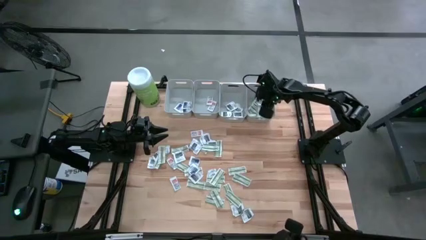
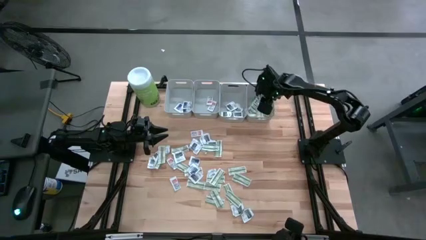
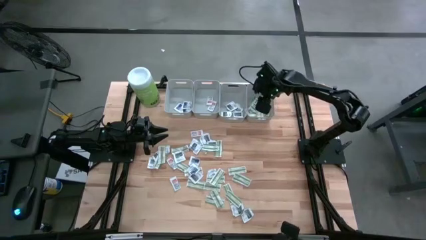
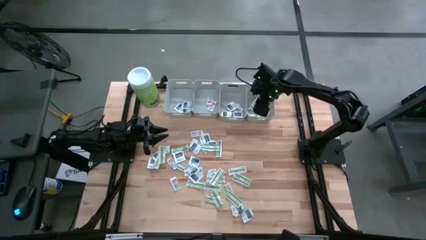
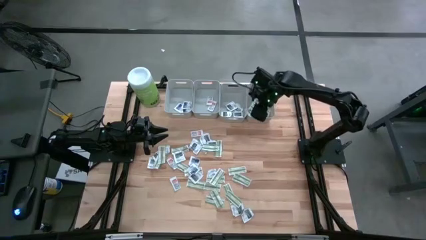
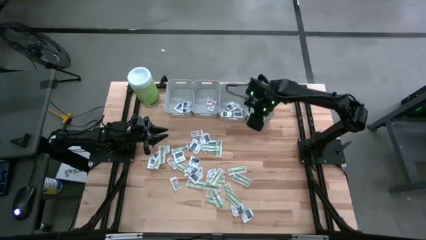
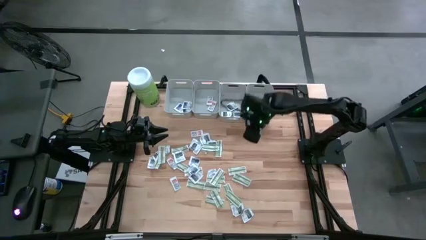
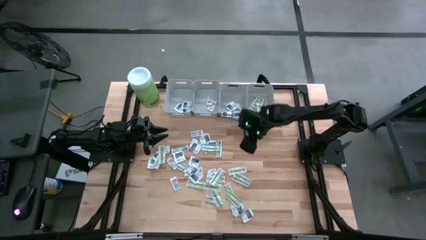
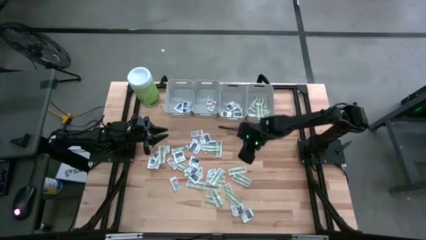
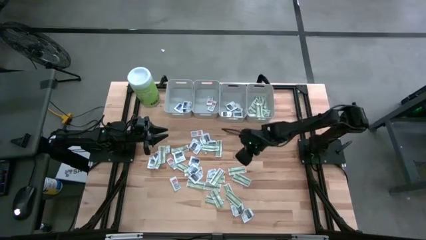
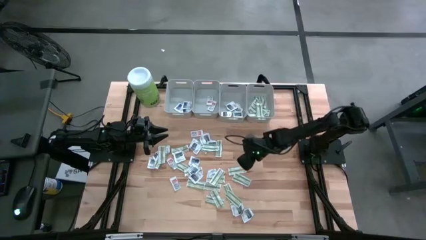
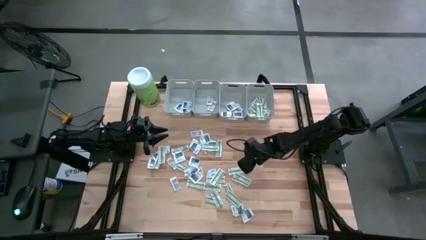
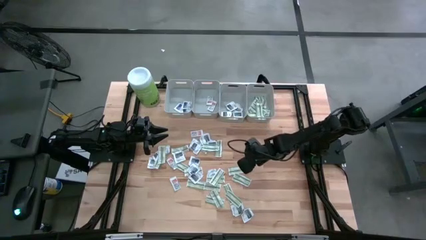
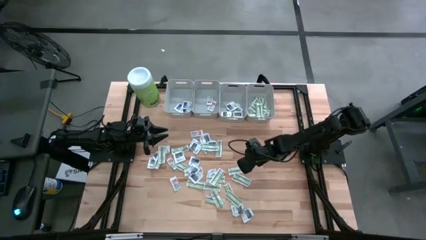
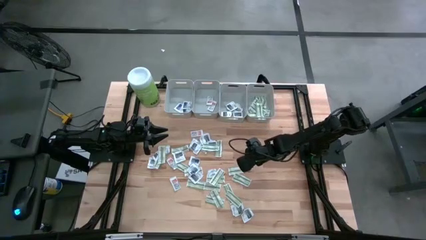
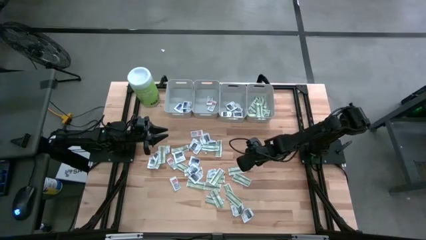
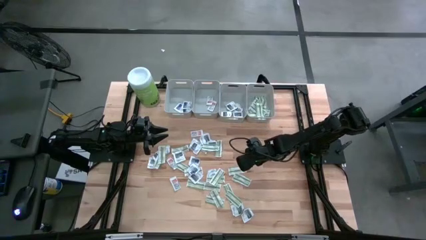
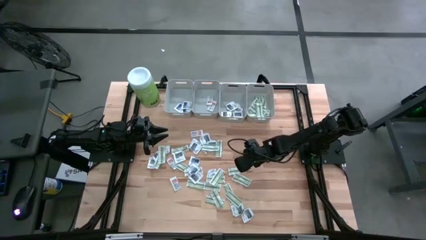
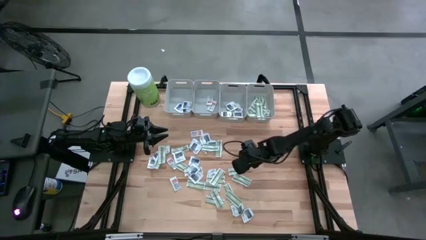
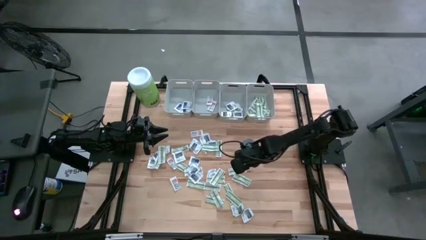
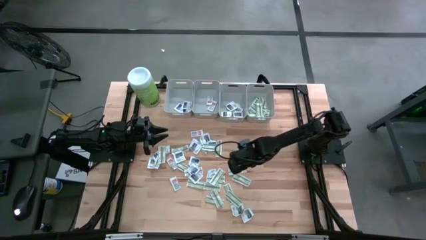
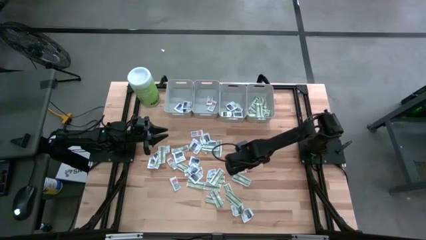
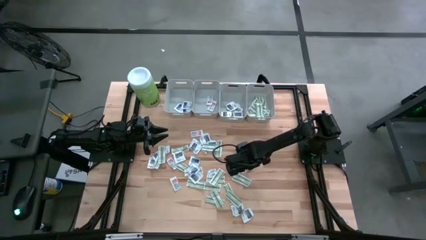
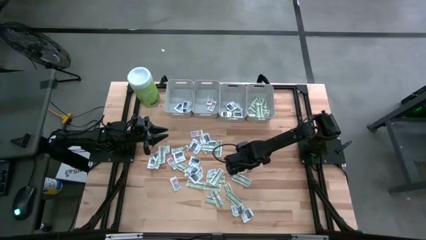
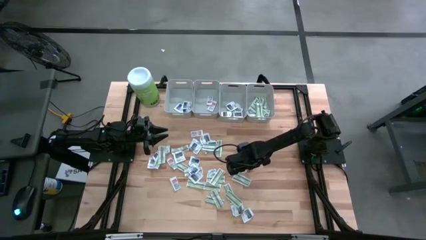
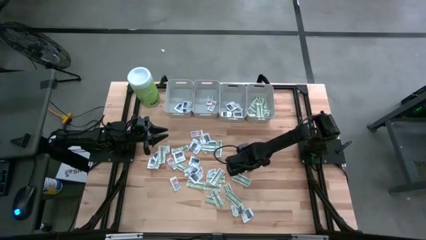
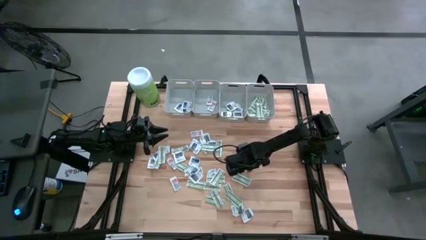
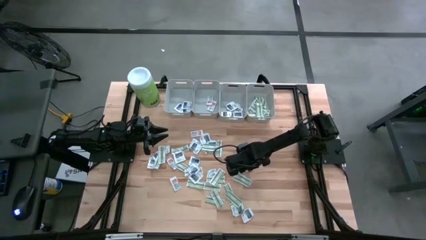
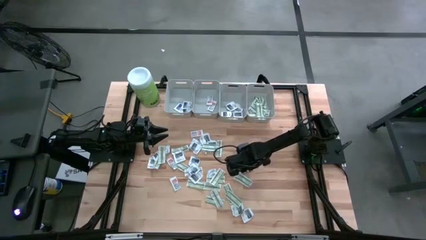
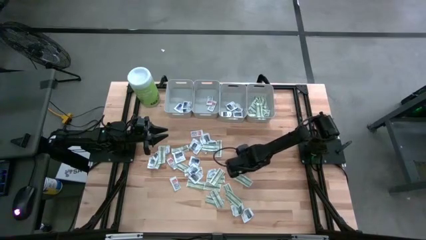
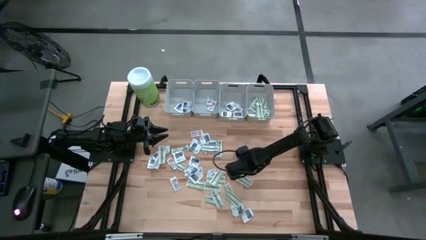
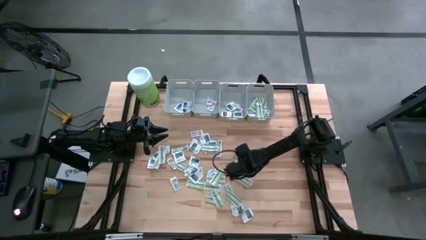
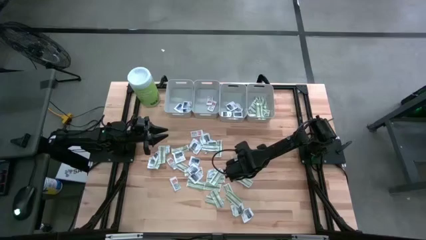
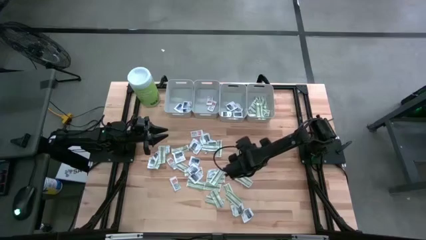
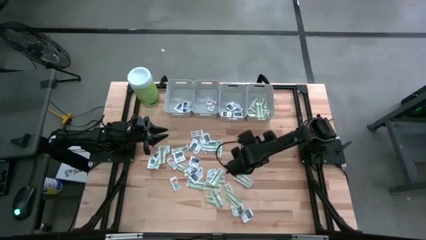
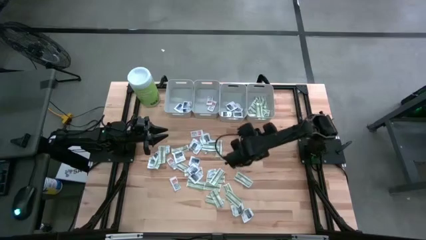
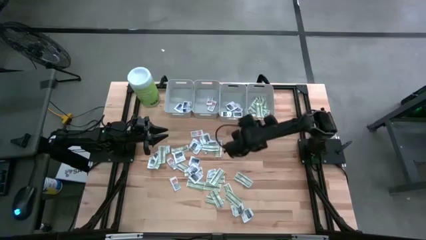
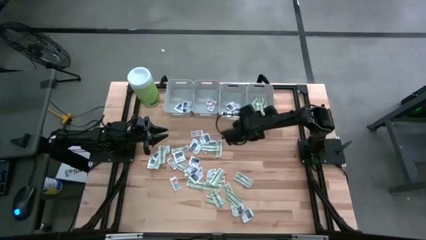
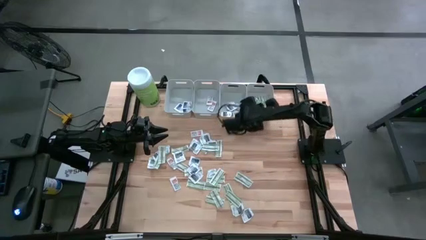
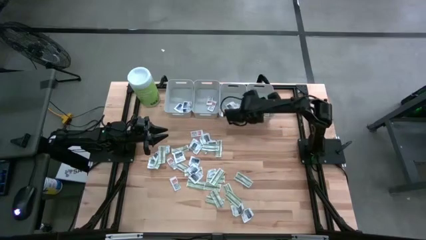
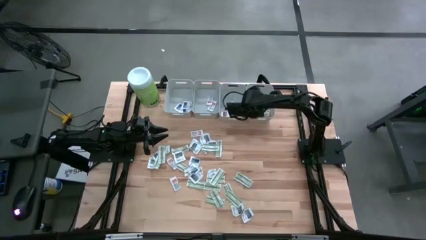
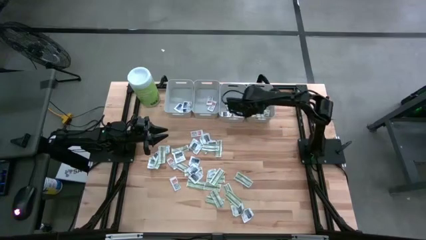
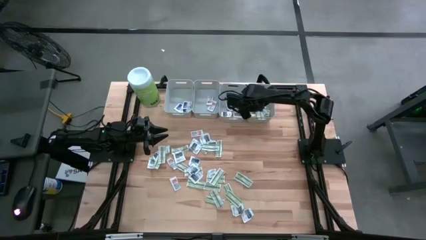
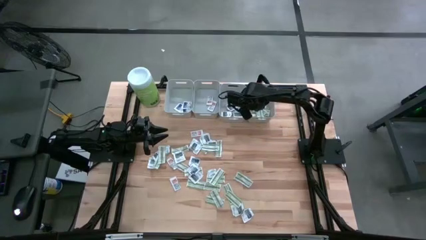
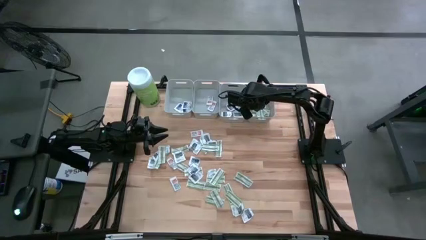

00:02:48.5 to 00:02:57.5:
Task: Pick & Place First Aid Supplies
Put the bandage into the right gray bin

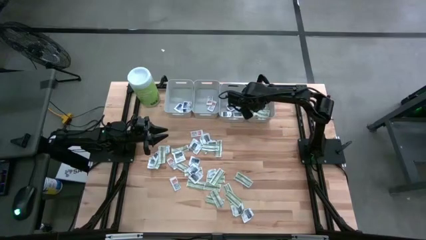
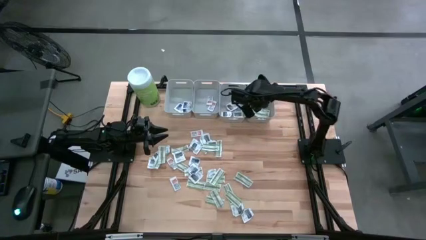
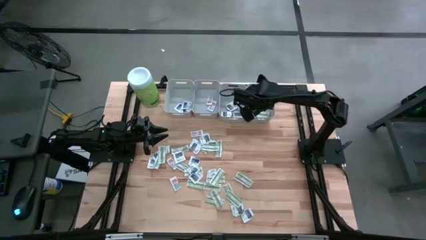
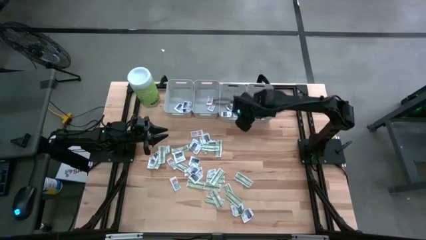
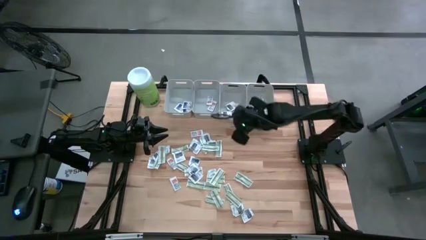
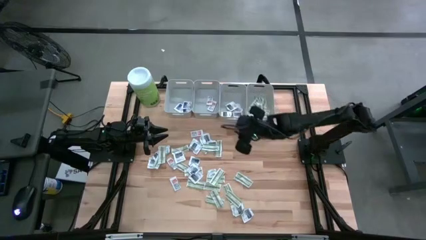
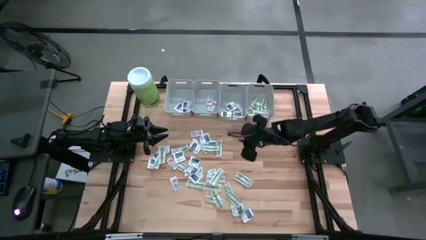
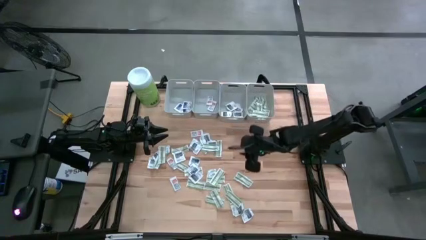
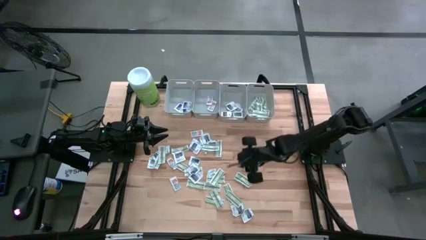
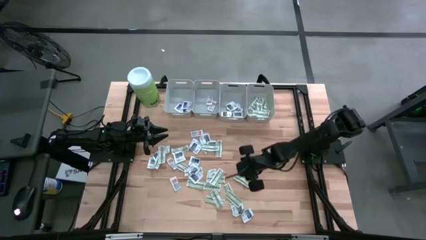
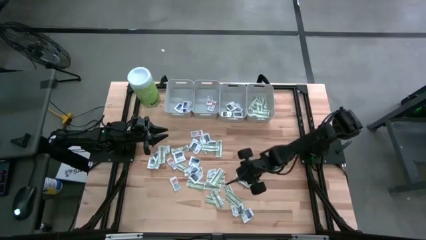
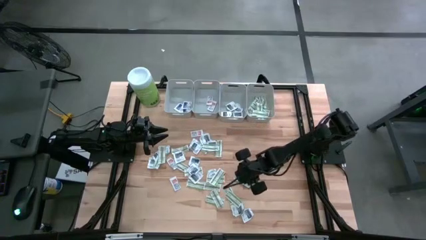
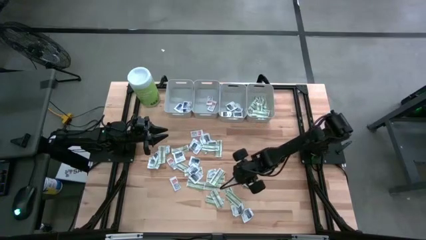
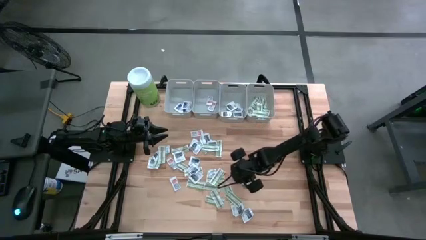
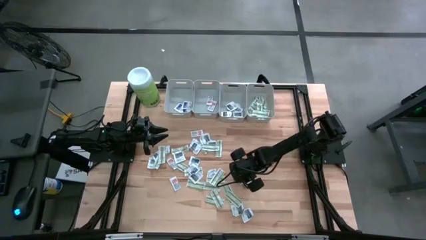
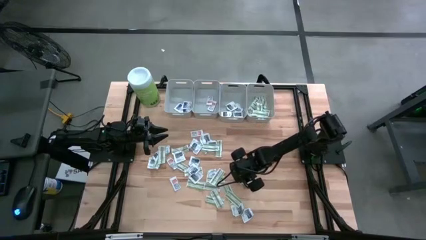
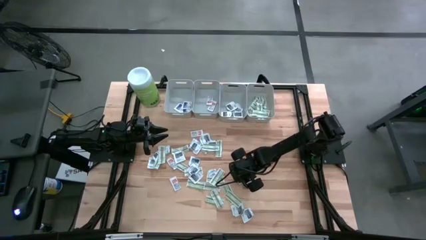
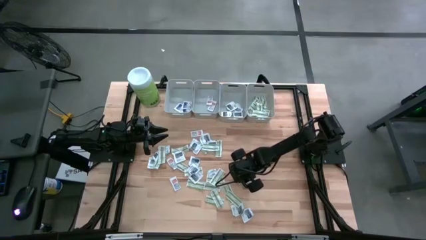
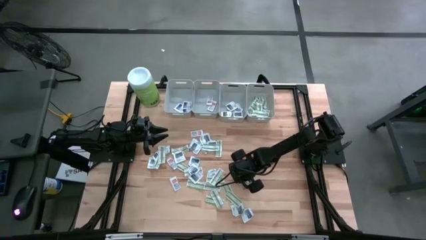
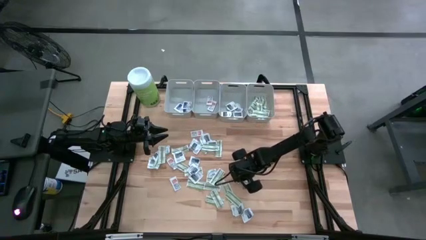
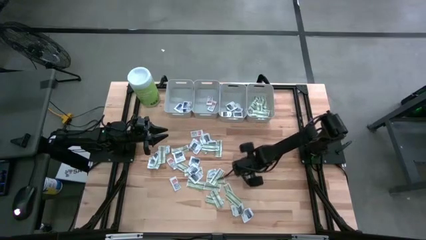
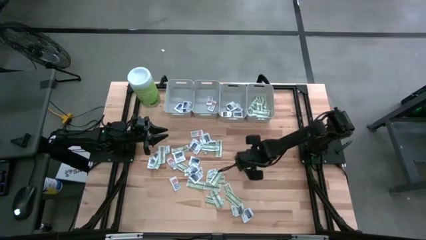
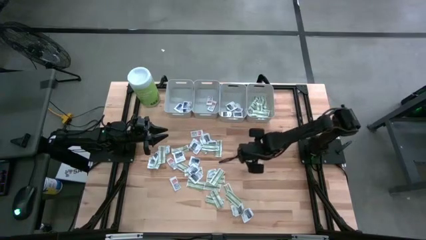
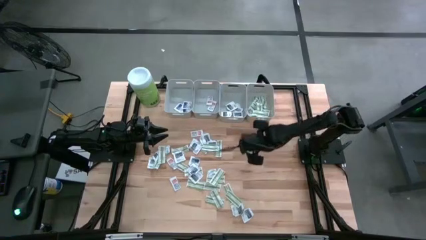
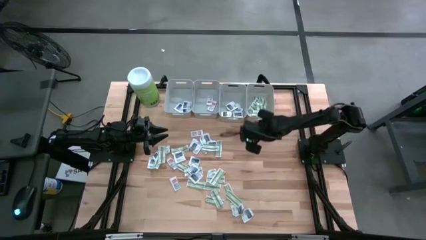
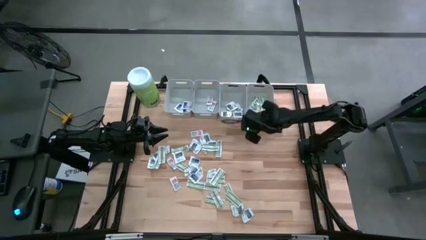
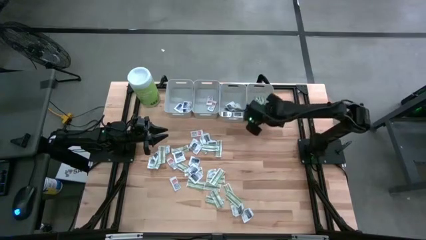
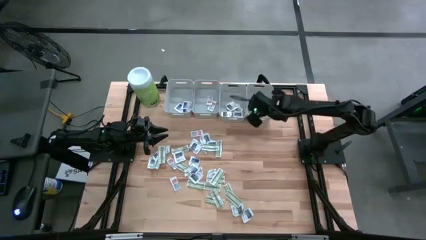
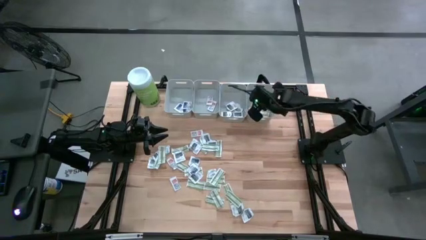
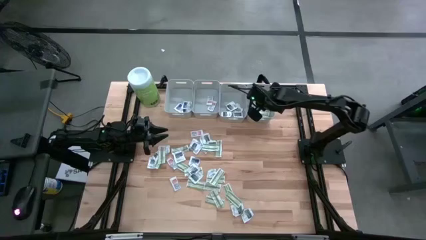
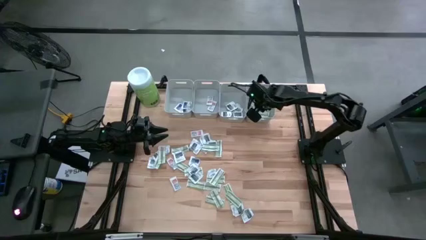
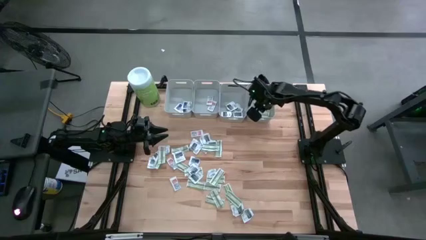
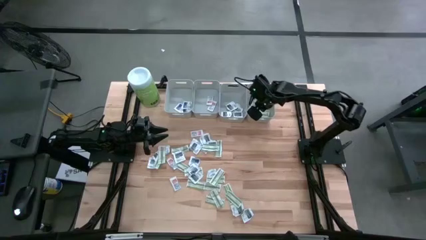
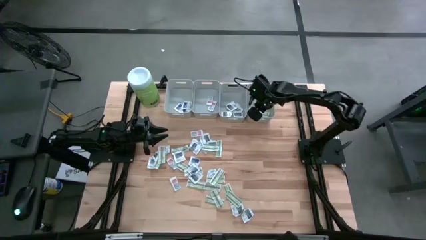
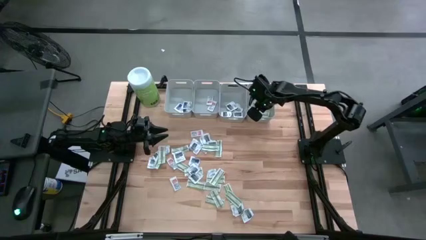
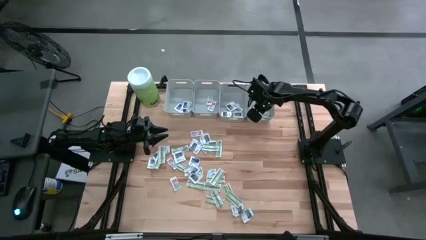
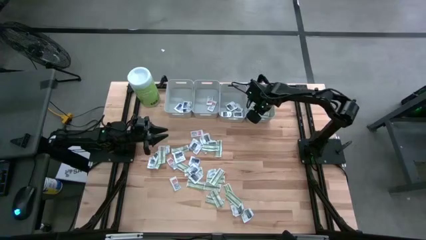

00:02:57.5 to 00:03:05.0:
Put the bandage into the right gray bin
